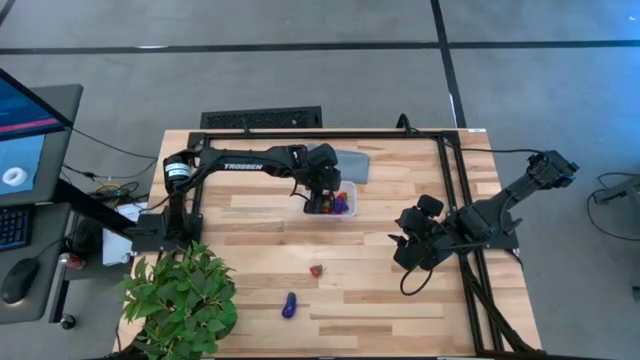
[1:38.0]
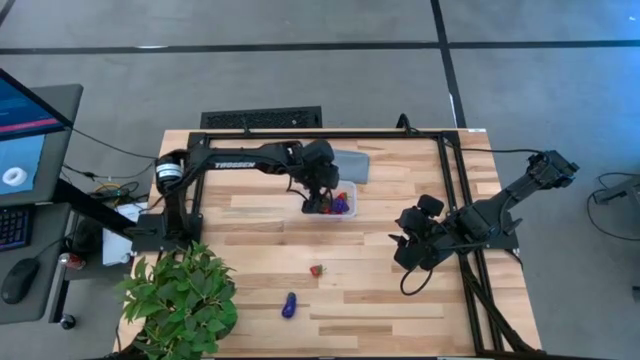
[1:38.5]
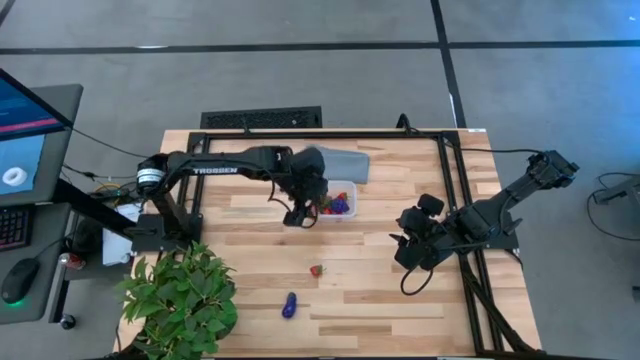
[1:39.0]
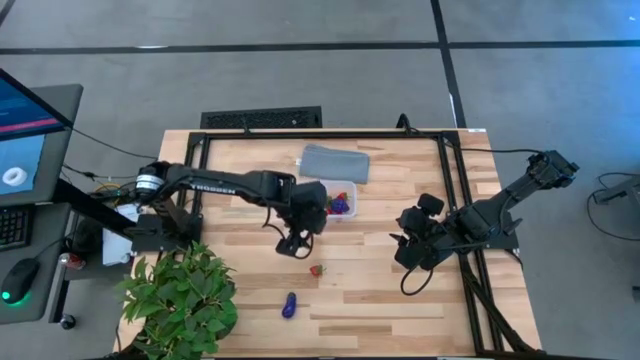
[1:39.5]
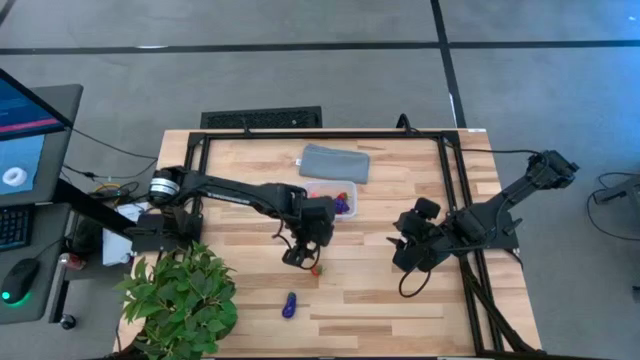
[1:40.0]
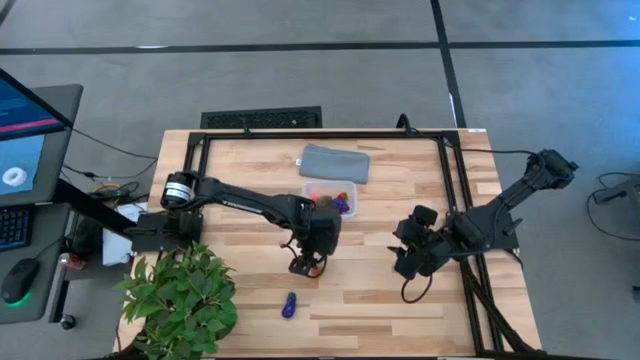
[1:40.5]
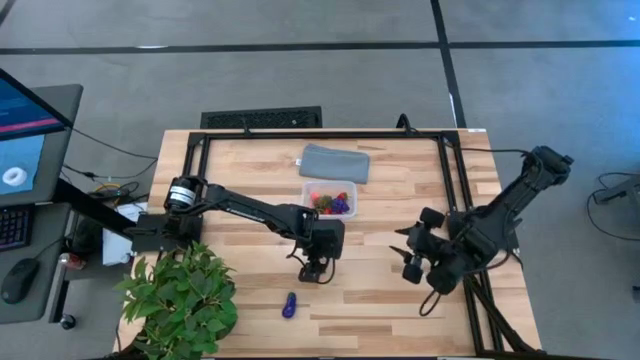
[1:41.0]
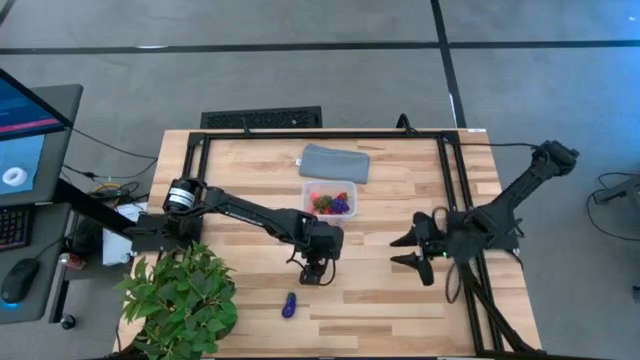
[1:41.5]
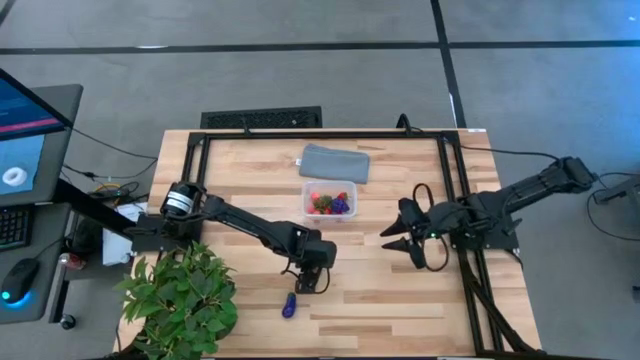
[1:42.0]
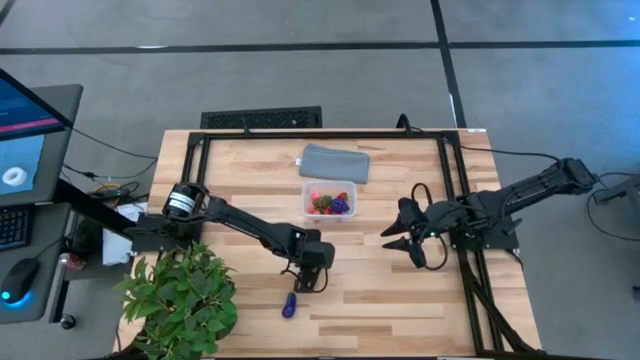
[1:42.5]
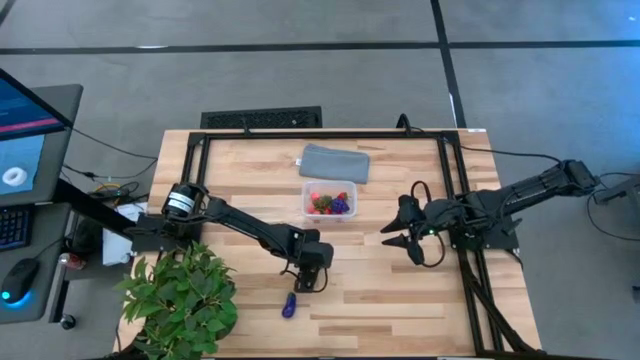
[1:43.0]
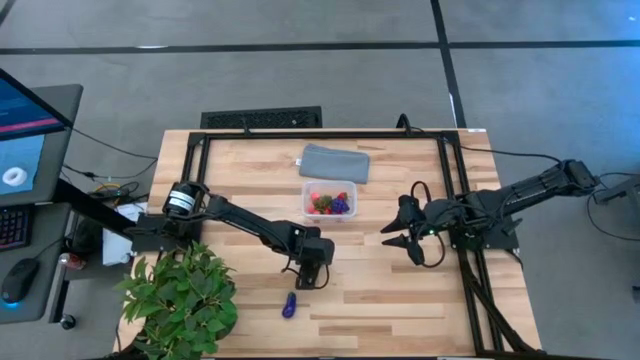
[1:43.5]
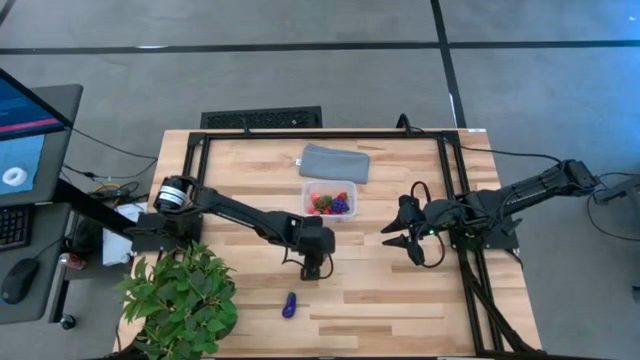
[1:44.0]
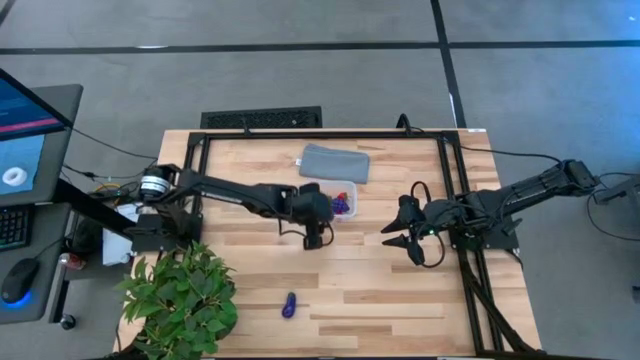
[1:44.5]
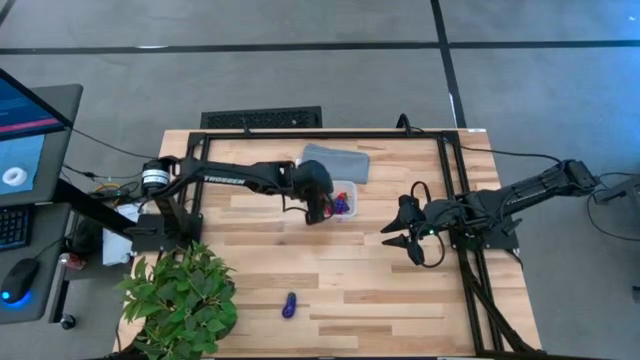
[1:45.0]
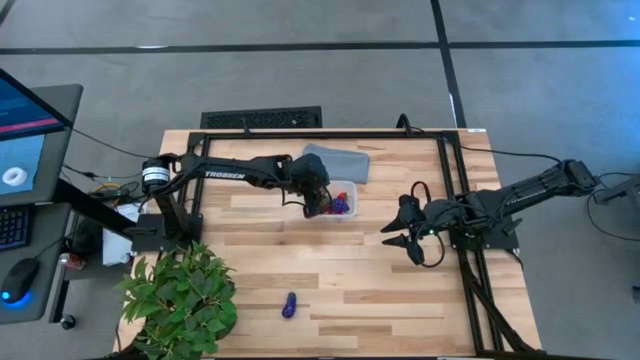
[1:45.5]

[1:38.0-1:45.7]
Task: Pick and placing Produce into tupperware
Put the red strawberry into the transparent bin

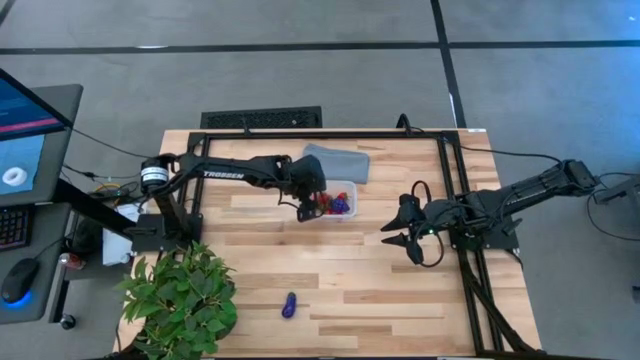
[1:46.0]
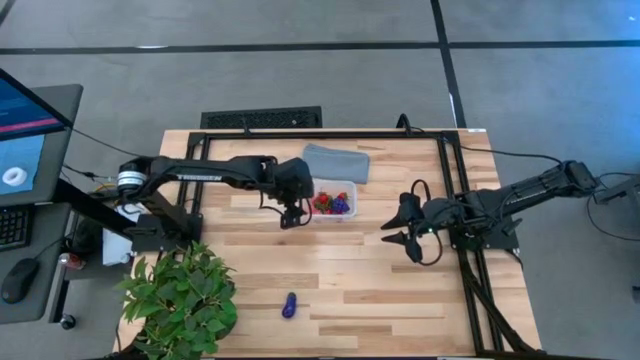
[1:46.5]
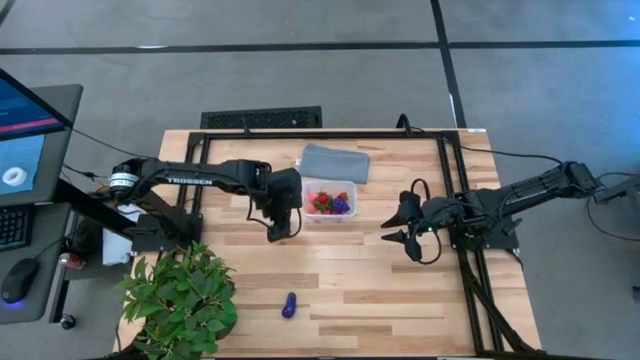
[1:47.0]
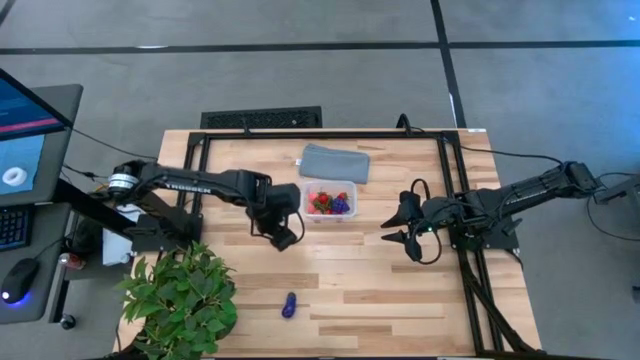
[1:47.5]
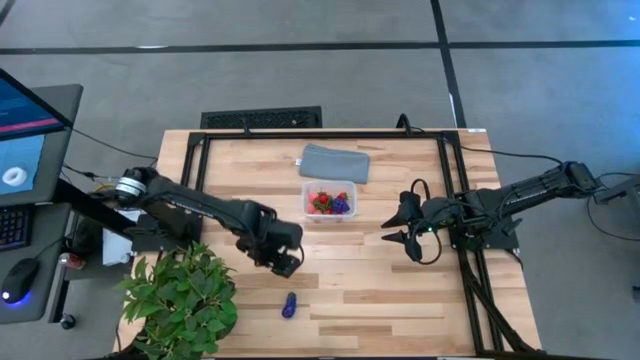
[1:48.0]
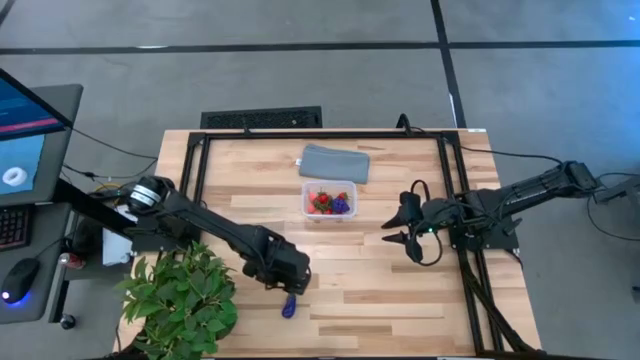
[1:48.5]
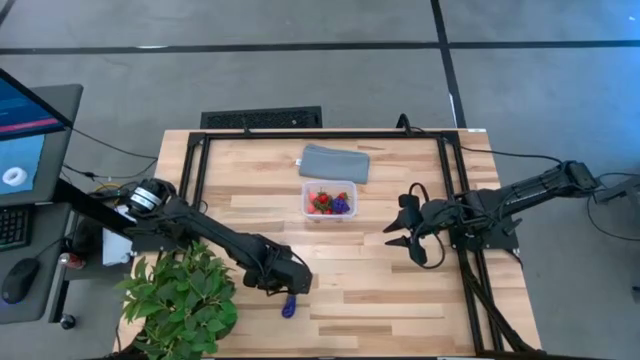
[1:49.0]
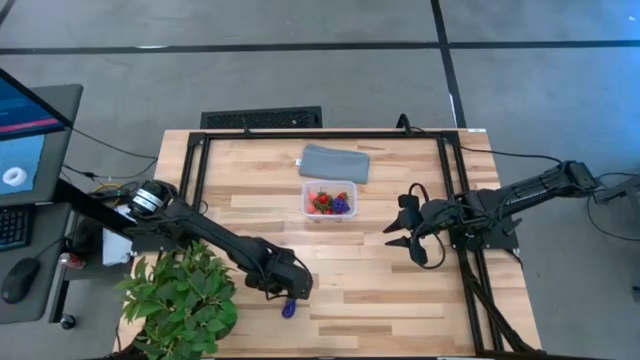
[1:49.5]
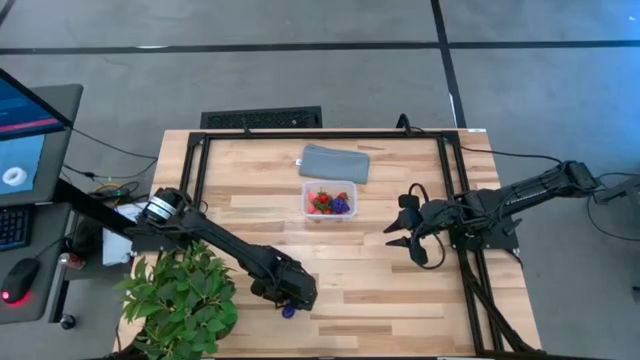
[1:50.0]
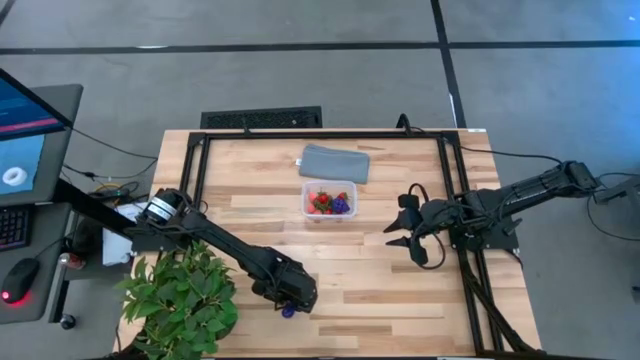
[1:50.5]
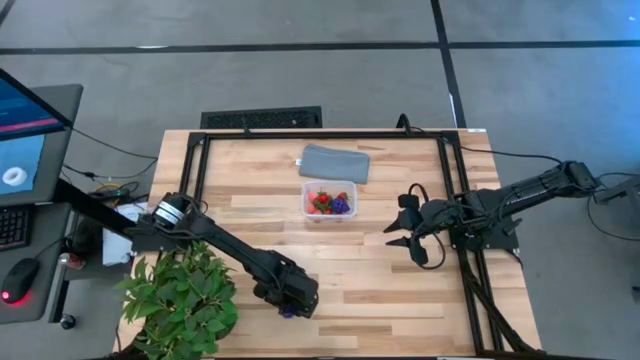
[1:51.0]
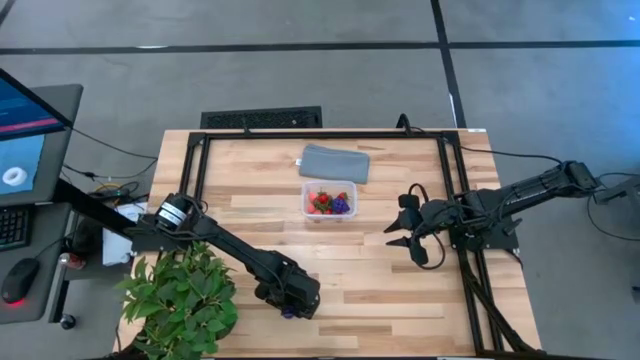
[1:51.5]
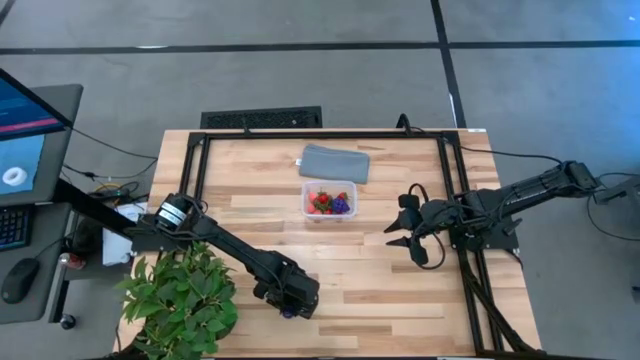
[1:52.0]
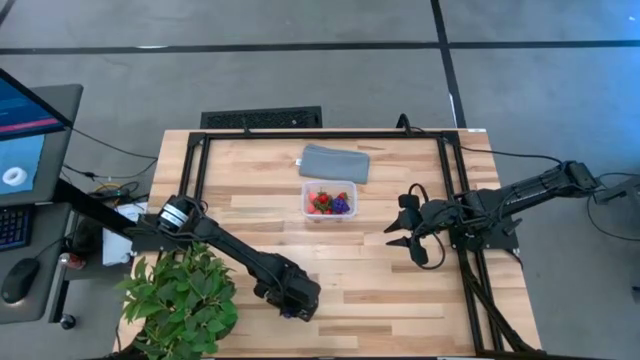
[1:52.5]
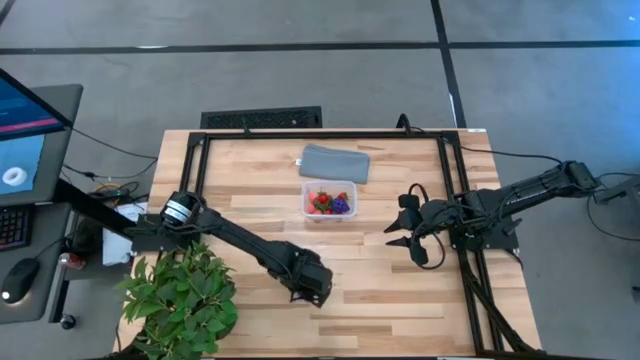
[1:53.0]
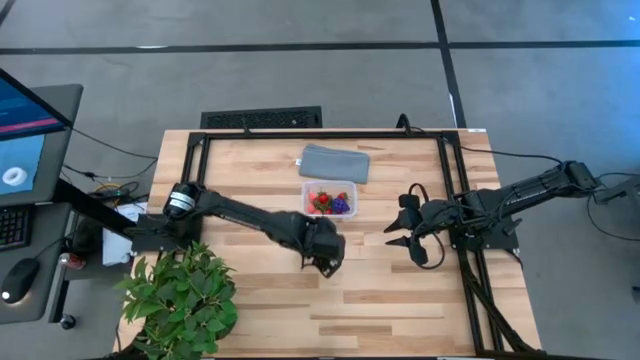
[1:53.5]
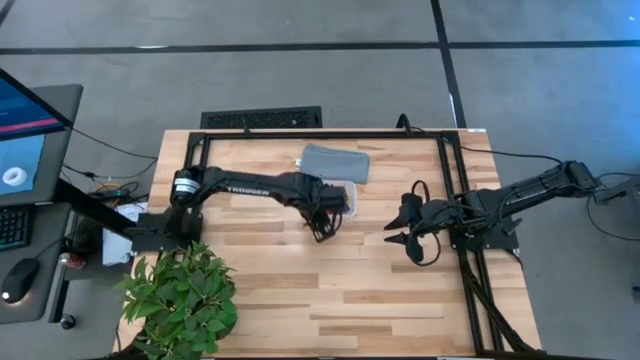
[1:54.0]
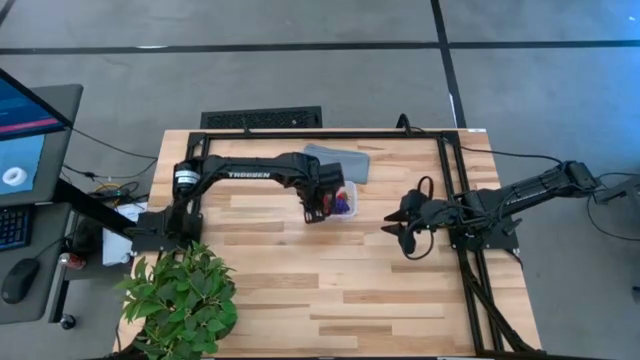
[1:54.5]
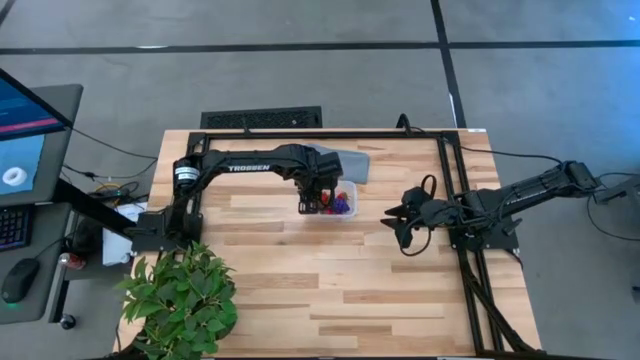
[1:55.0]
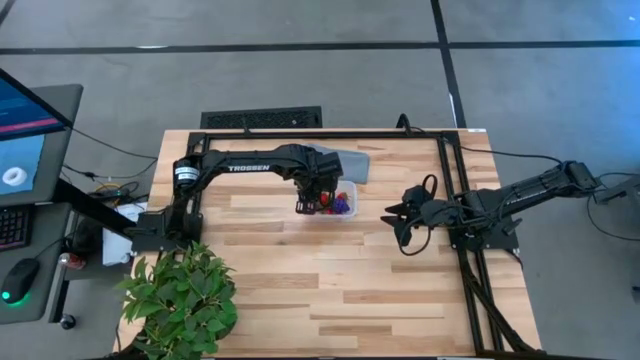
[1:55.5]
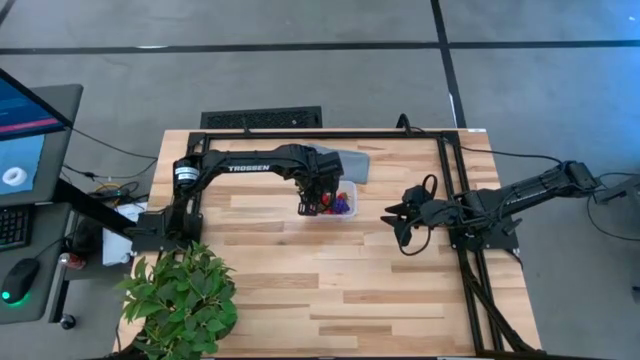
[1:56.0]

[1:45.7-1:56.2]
Put the purple eggplant into the transparent bin

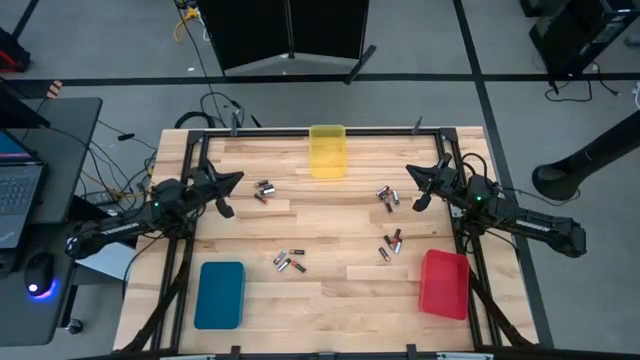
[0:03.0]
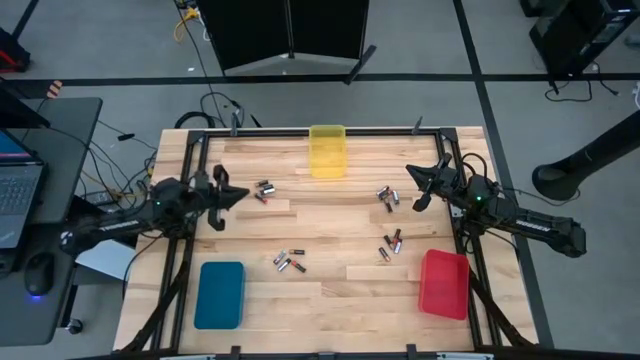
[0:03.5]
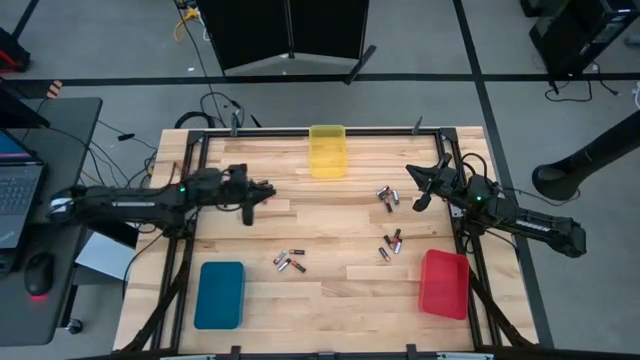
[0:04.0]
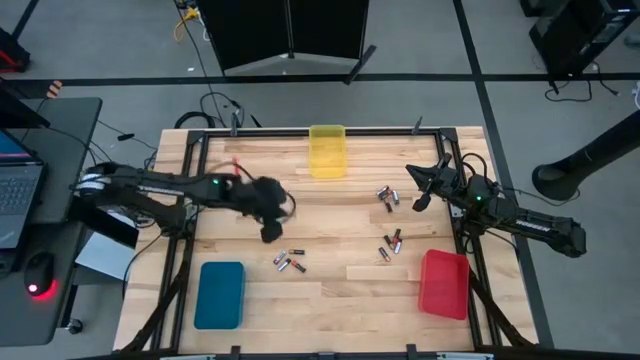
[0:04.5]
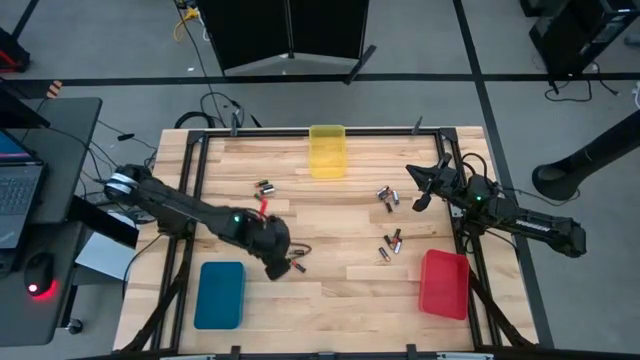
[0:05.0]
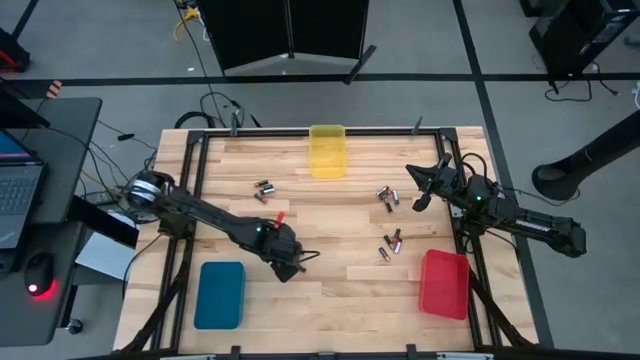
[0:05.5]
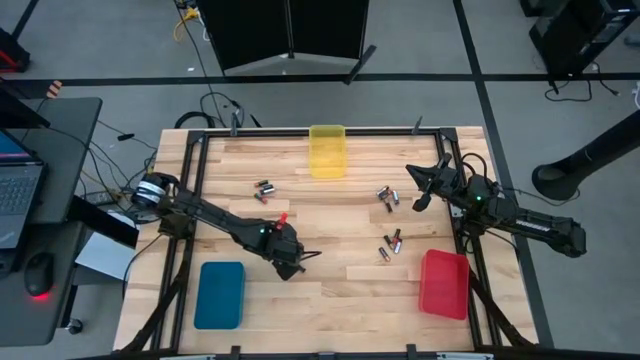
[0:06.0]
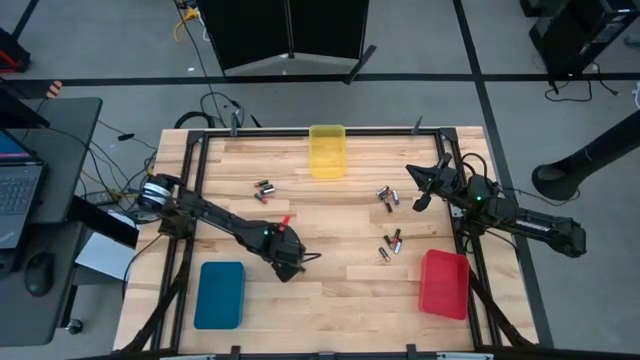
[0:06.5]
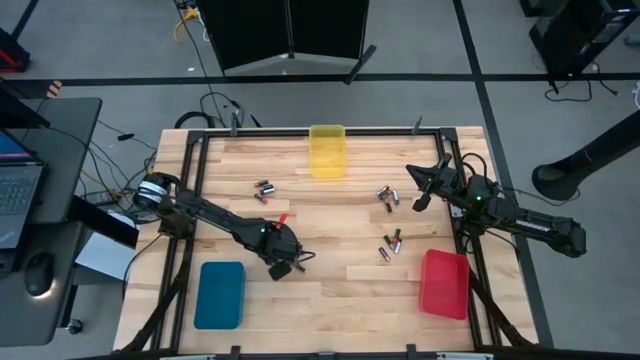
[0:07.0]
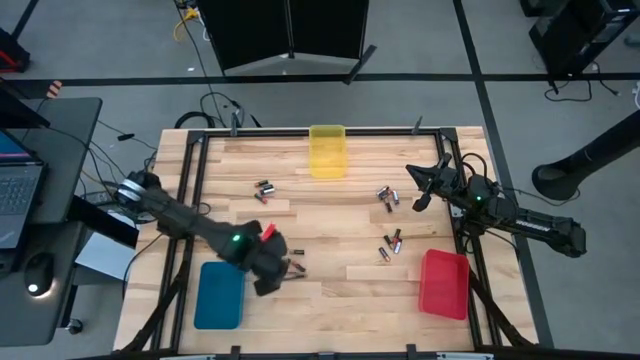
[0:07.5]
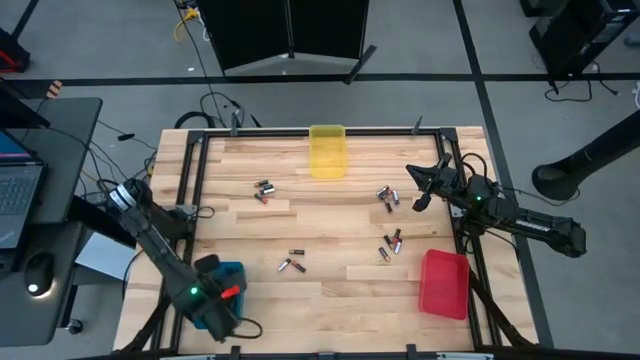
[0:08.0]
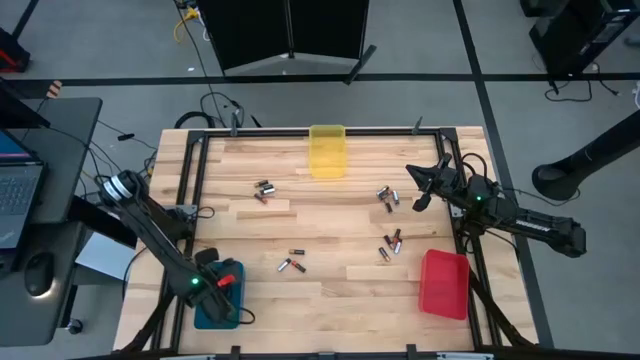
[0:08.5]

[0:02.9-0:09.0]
Task: Sort batteries
Put the silver battery into the blue bin
